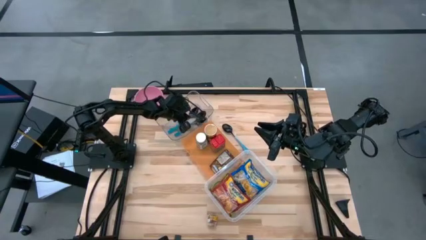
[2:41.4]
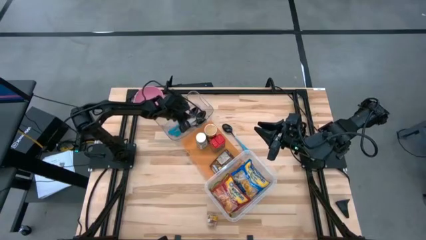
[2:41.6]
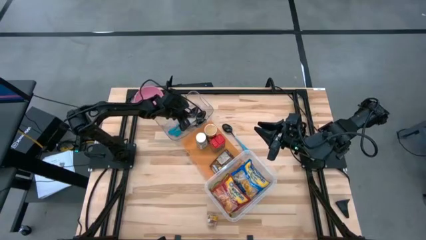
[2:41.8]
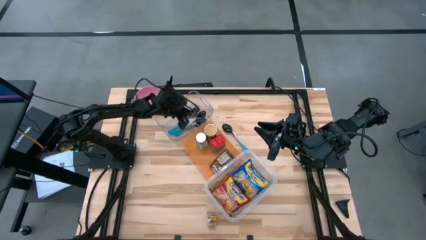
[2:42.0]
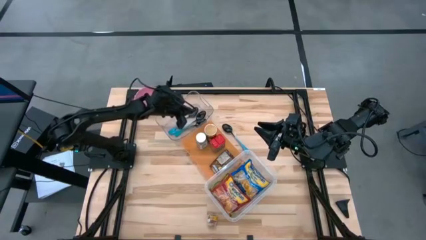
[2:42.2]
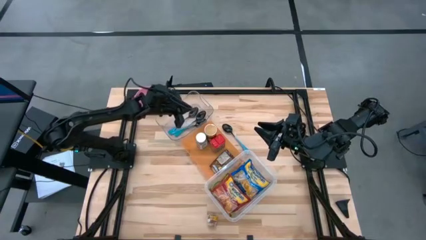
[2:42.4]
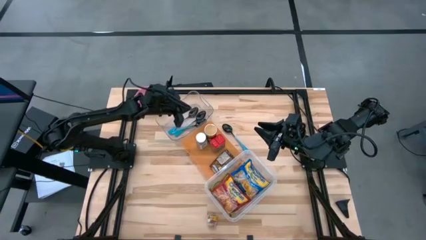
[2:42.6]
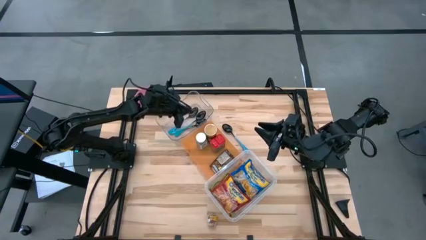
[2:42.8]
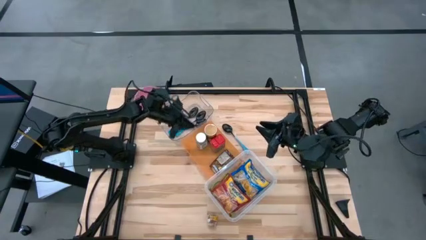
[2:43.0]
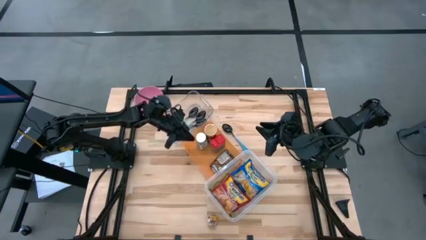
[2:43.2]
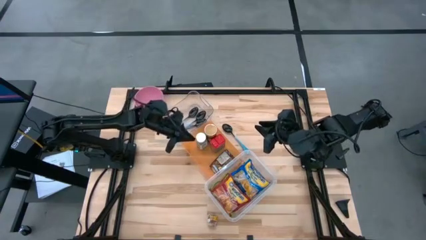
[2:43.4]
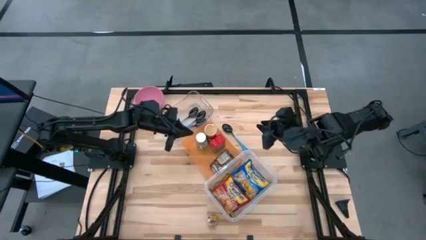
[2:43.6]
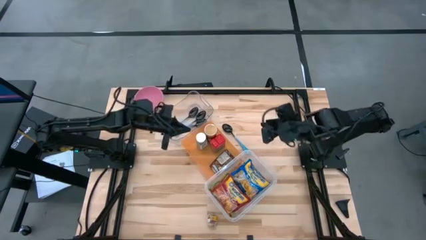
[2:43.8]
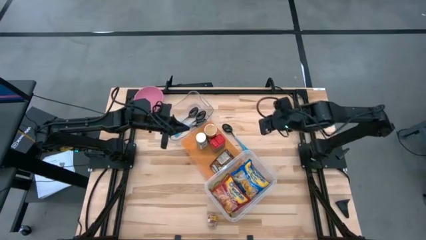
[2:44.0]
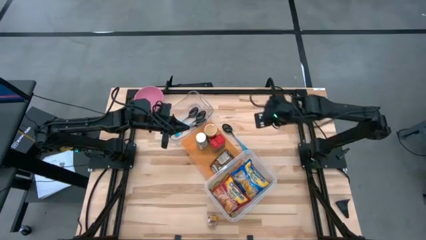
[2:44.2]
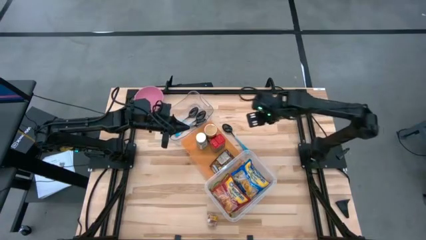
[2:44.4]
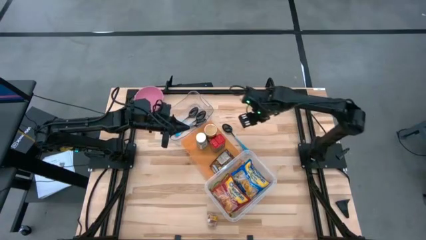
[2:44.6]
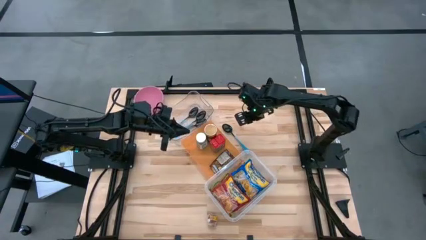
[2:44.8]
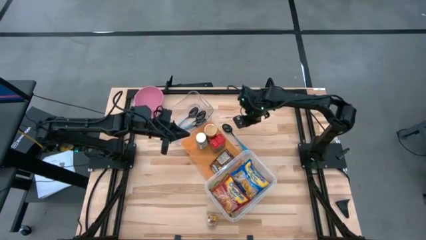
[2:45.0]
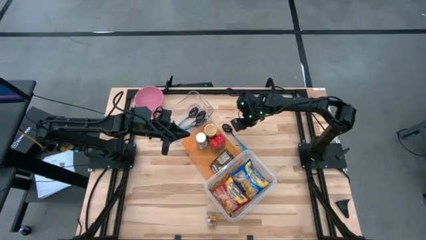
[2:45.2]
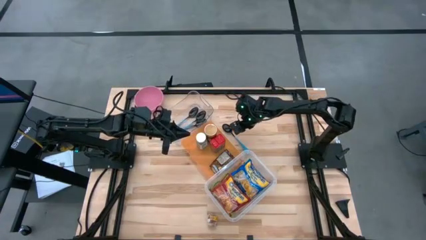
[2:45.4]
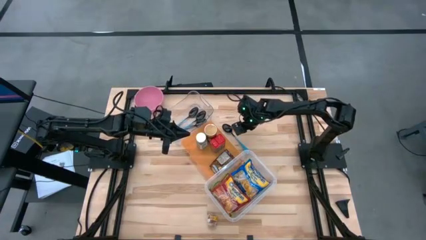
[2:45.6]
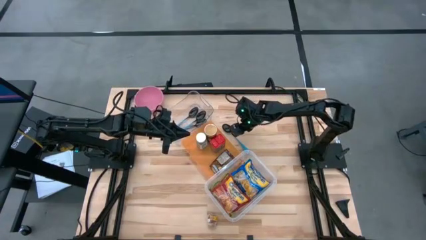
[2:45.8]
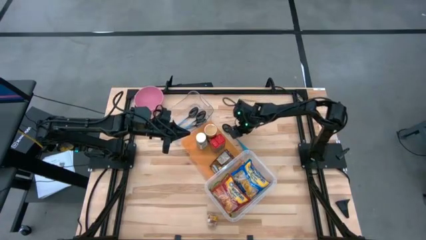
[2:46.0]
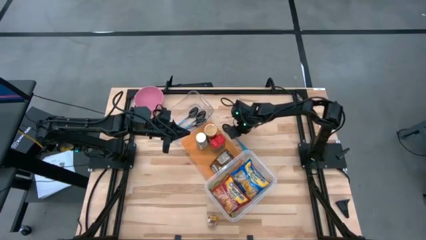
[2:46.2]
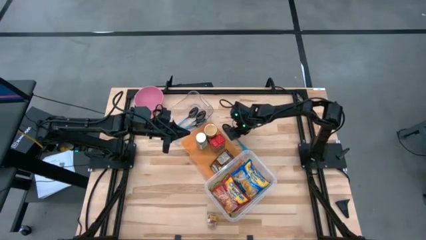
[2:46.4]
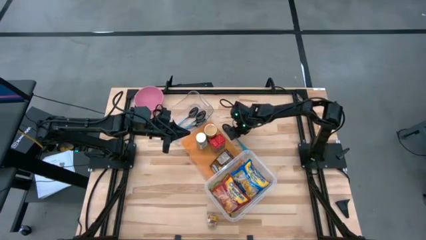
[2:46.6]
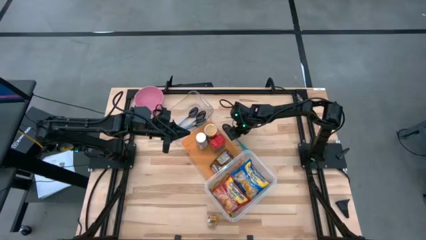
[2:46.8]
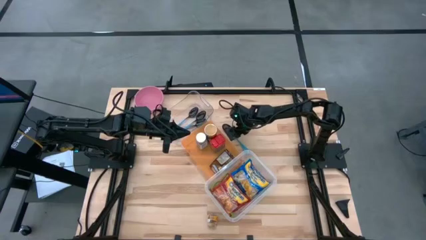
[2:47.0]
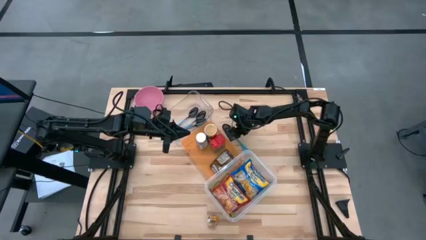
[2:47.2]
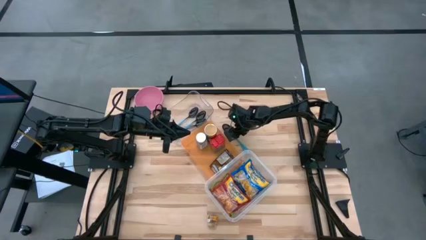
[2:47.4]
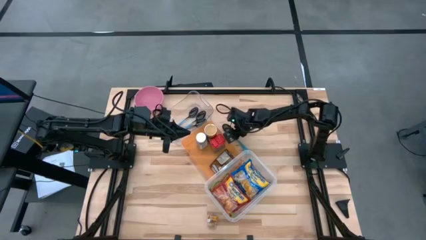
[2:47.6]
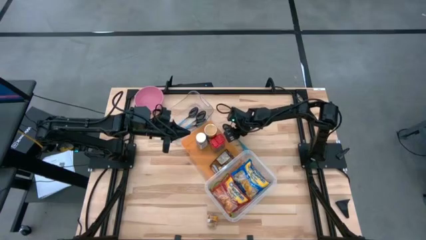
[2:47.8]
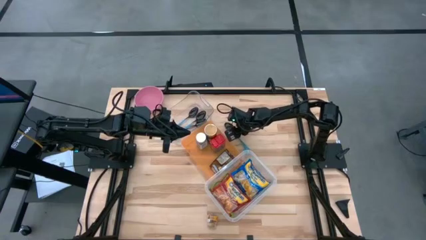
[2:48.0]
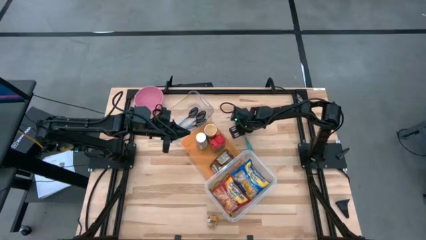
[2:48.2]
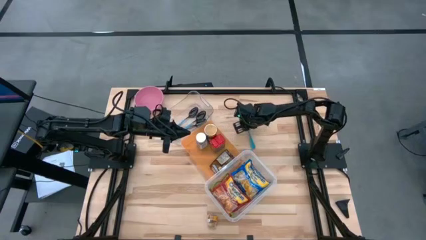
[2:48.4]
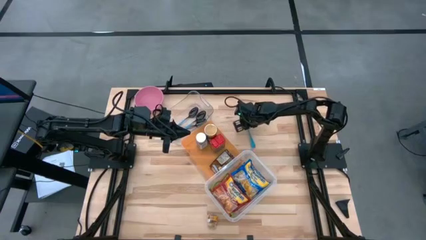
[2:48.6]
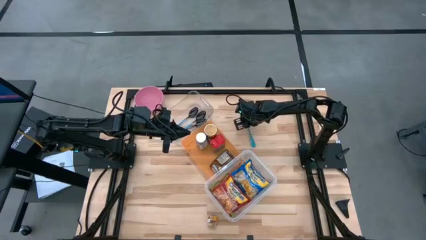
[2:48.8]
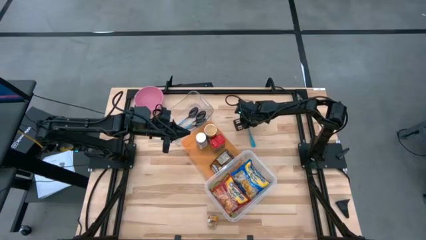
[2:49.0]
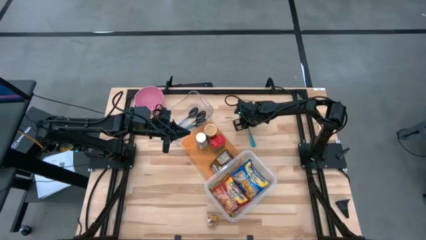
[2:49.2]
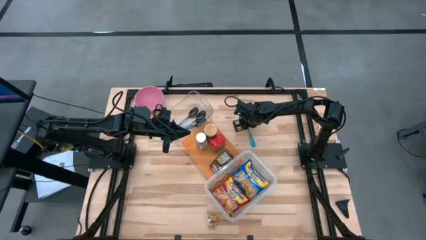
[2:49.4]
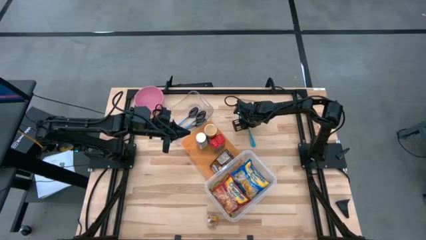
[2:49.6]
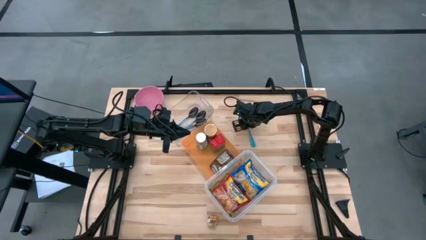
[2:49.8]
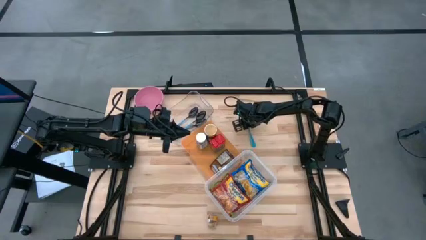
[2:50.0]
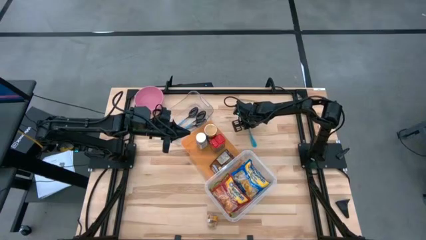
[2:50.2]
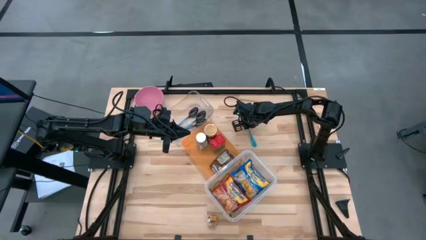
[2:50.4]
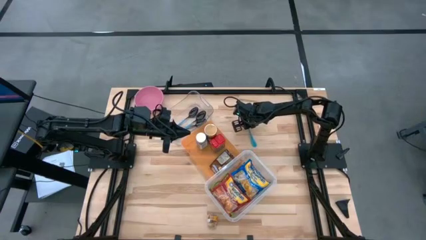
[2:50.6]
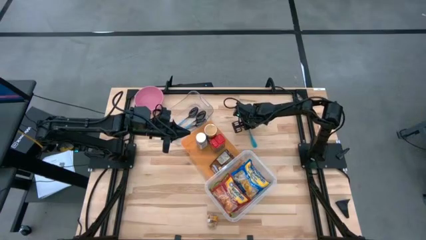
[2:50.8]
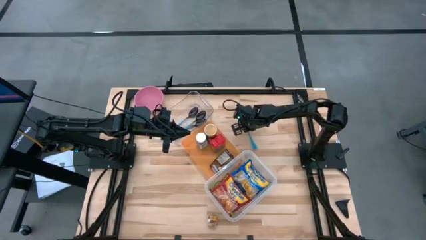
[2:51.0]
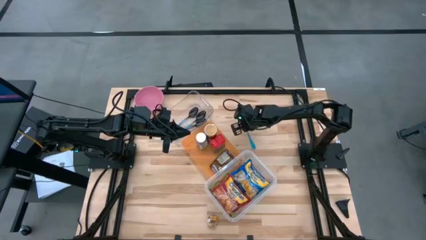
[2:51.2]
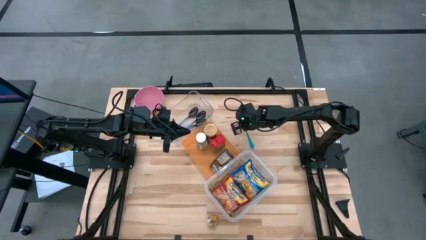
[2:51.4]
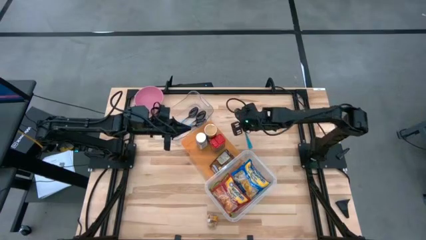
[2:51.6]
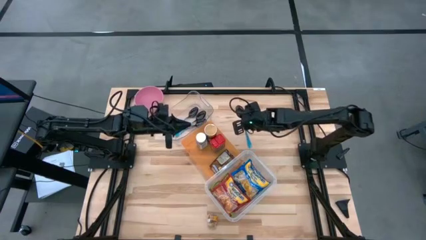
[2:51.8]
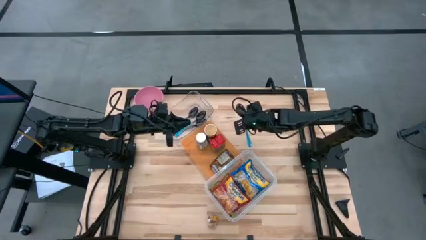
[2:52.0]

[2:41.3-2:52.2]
Task: Pick & Place Food Item
Put the blue spoon in the top transparent bin

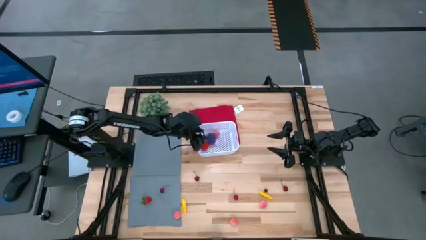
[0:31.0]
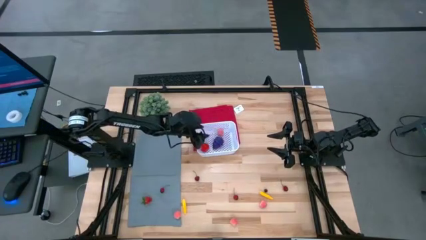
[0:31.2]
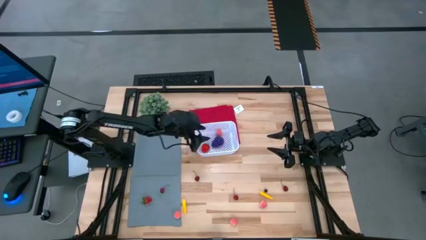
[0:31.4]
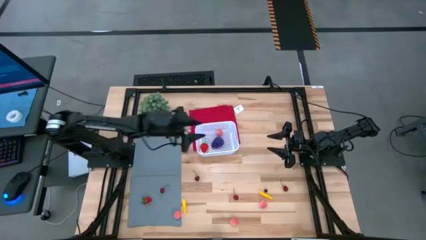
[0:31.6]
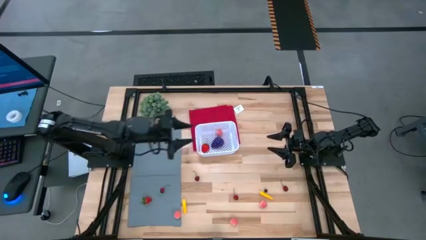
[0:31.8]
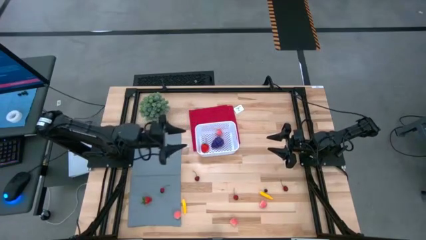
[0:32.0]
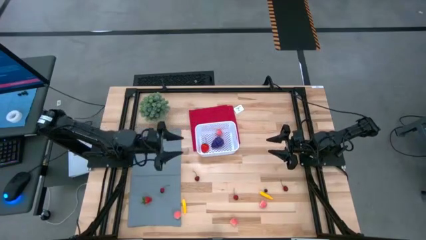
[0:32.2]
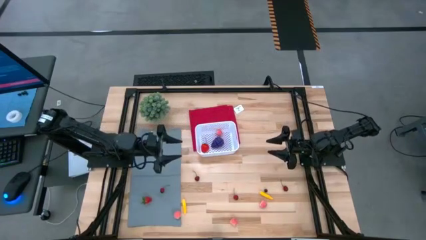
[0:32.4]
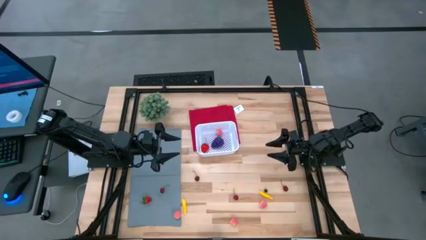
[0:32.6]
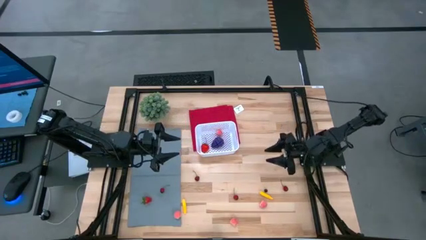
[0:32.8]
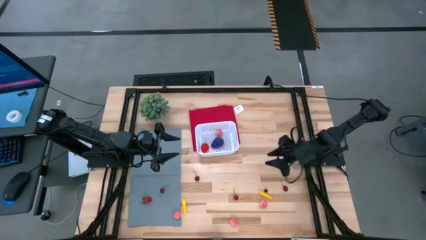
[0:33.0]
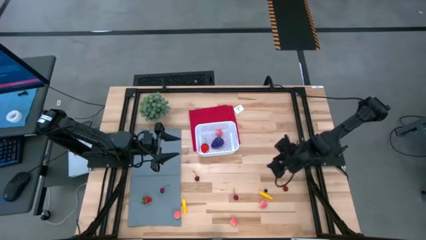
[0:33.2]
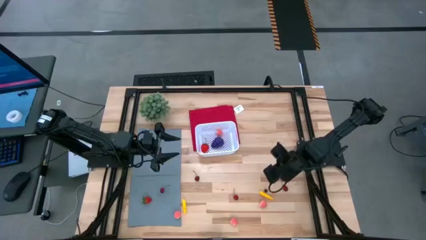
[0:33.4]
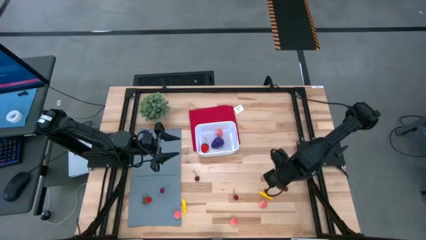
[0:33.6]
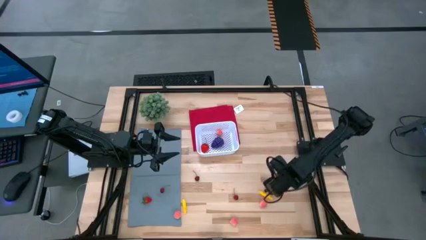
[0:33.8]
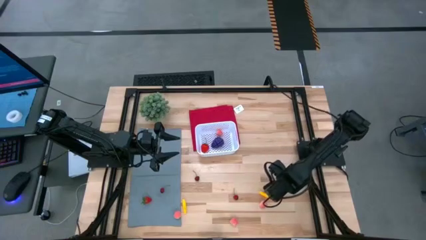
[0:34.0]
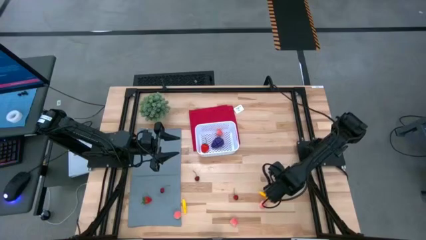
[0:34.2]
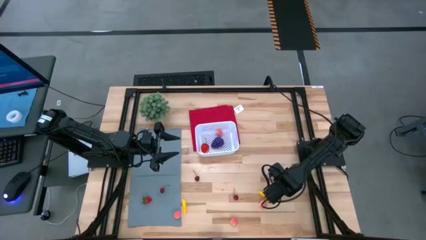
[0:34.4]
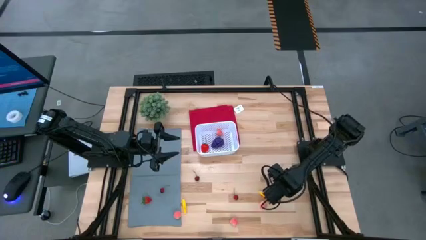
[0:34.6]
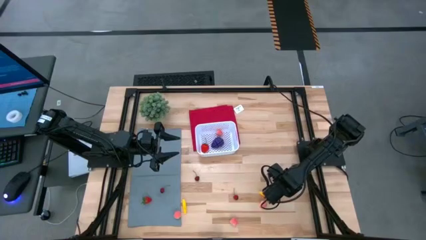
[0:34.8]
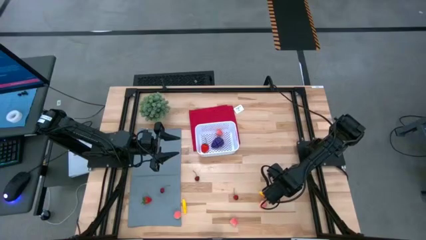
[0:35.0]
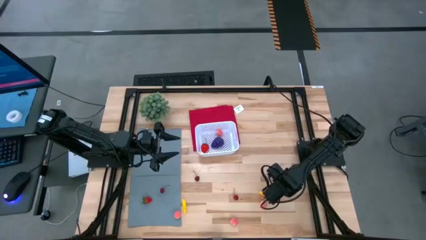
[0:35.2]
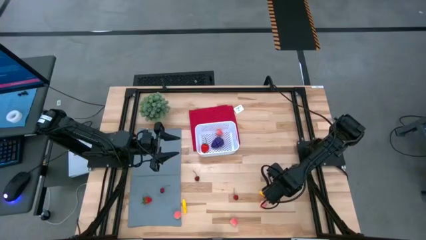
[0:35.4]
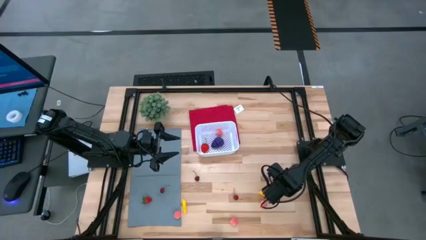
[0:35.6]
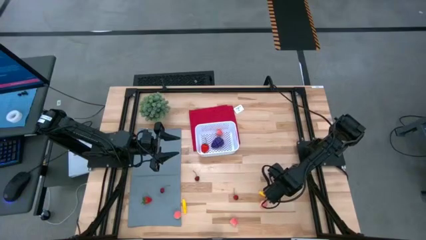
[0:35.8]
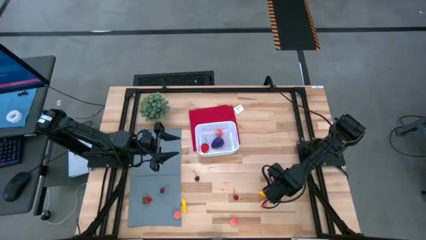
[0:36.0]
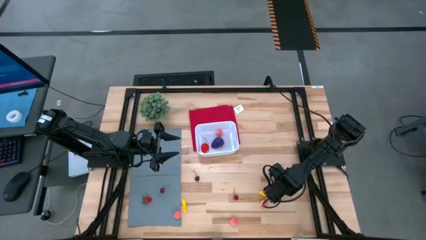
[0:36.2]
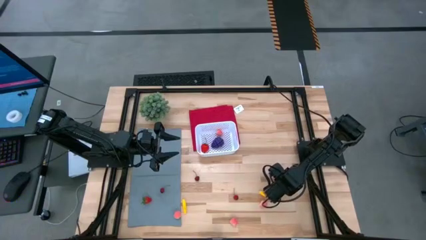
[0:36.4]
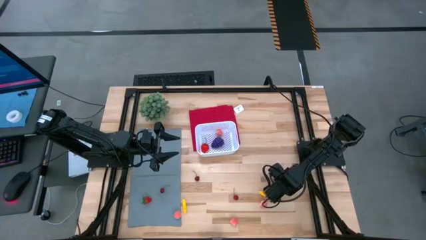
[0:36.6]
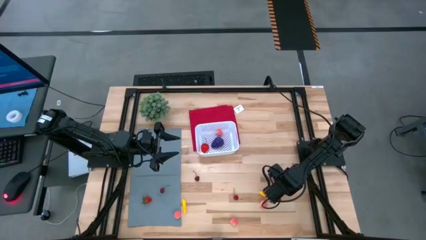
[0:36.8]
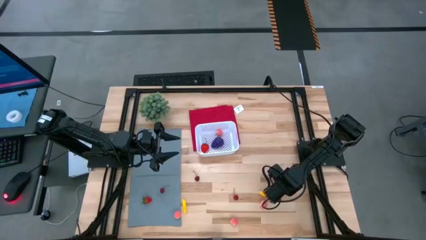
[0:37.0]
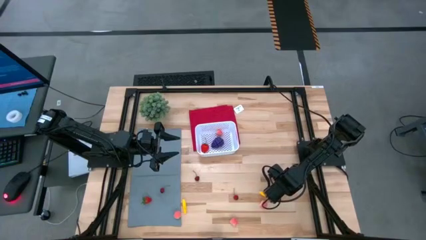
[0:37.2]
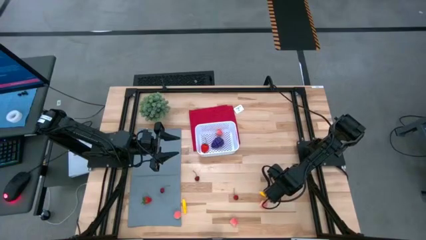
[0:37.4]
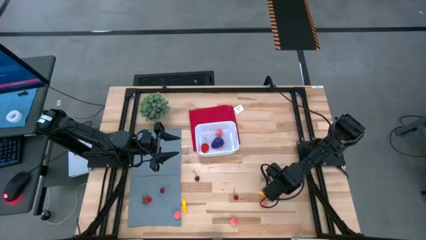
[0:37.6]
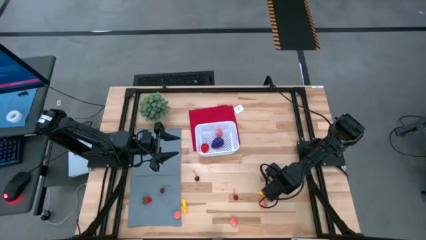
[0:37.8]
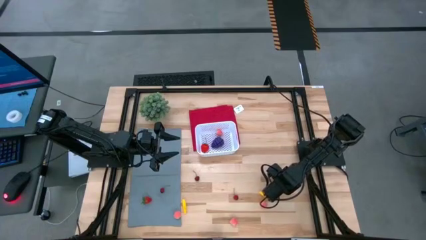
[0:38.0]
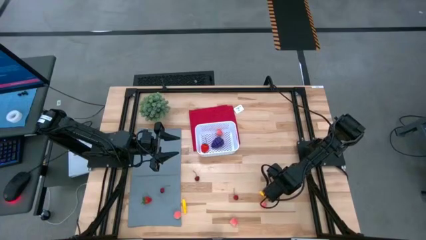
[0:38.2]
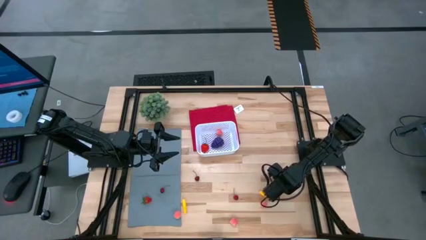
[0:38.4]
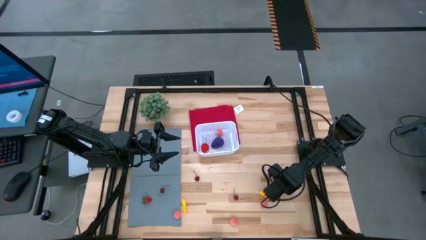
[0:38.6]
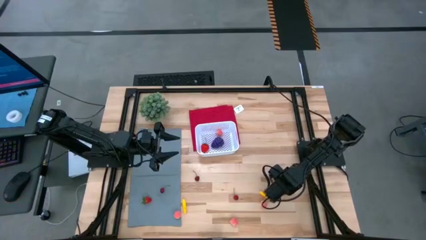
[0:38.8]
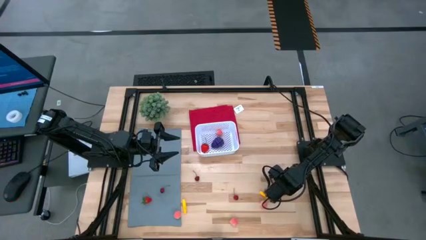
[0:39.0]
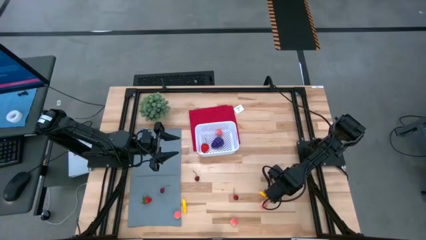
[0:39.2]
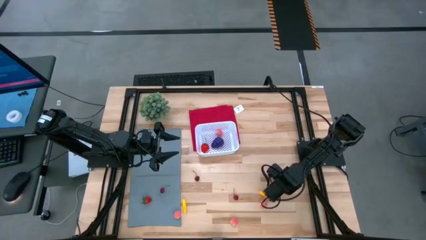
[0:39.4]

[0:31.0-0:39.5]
Task: Pick and placing Produce into tupperware
Put the red cherry into the white bin
